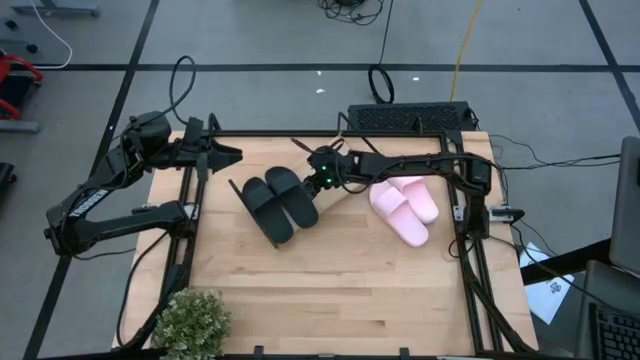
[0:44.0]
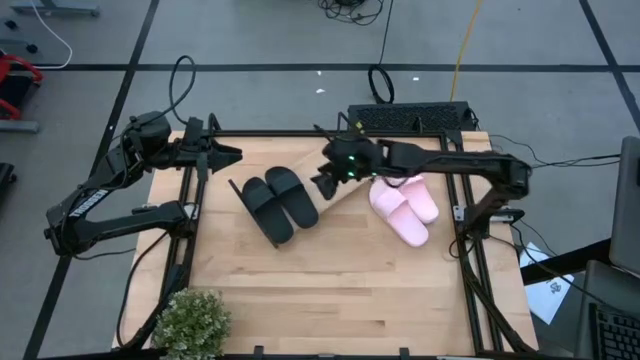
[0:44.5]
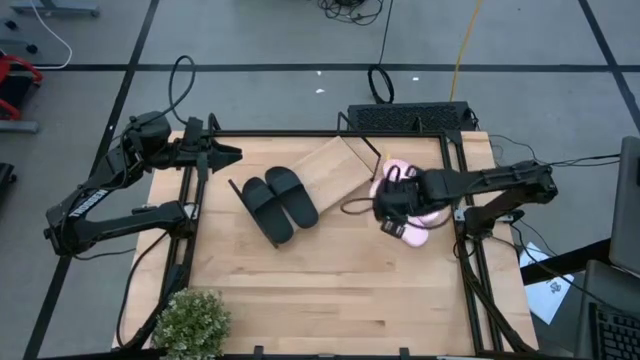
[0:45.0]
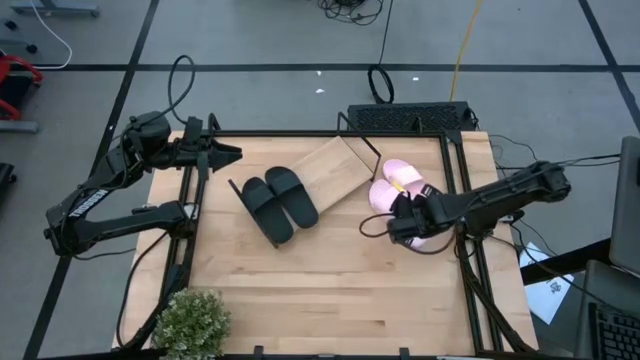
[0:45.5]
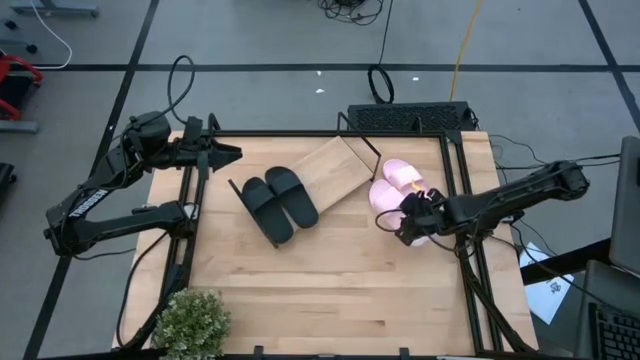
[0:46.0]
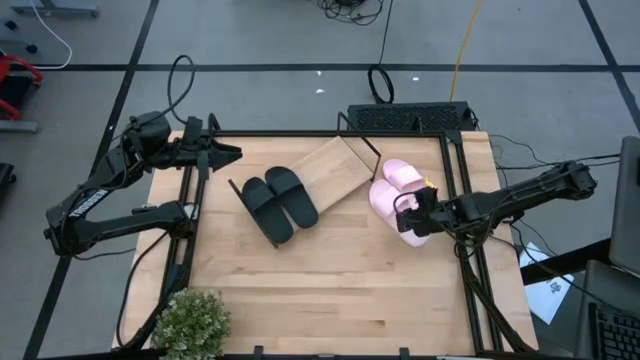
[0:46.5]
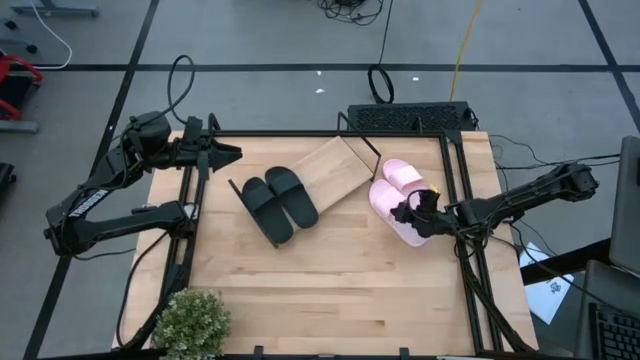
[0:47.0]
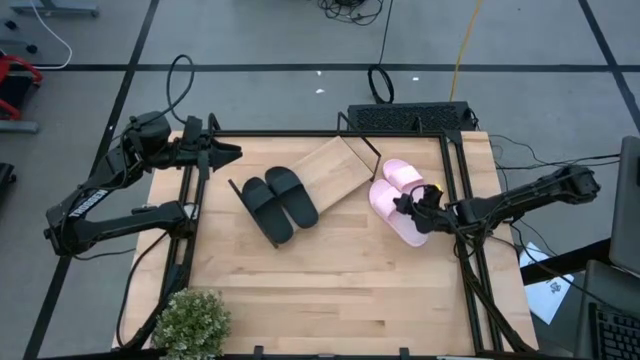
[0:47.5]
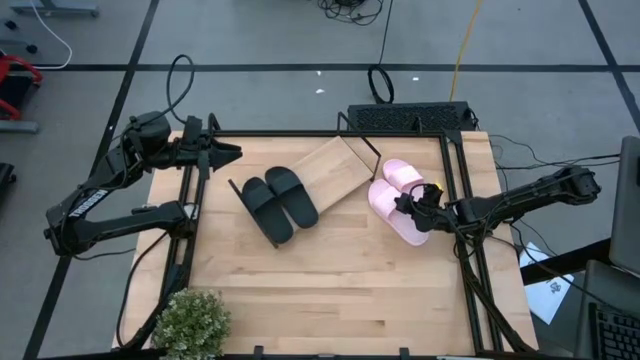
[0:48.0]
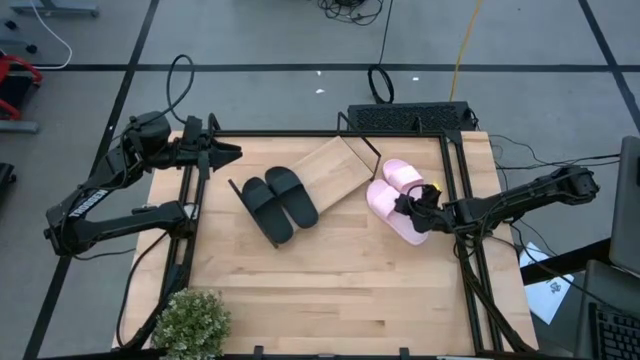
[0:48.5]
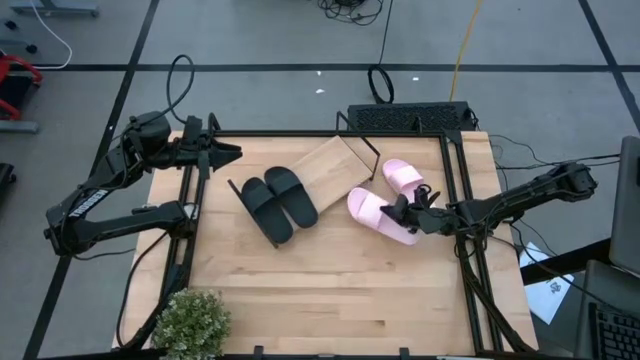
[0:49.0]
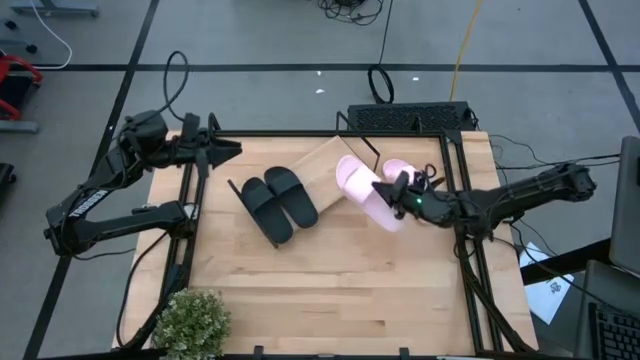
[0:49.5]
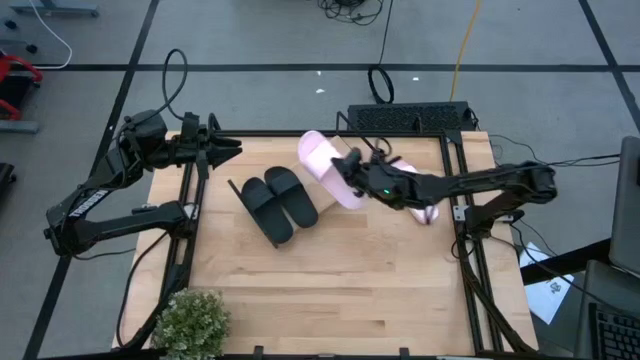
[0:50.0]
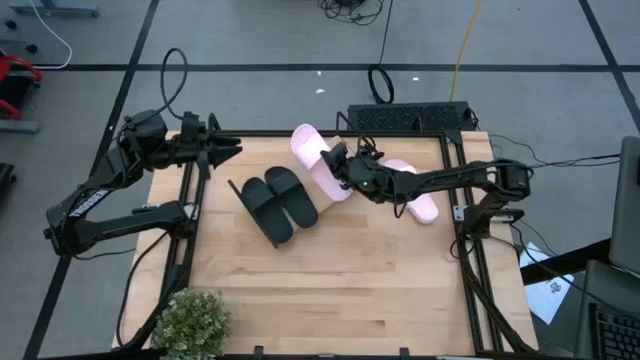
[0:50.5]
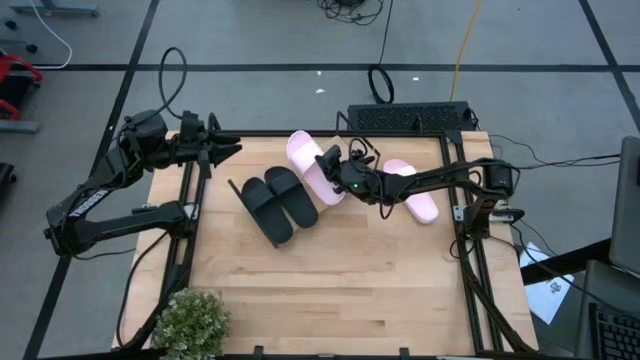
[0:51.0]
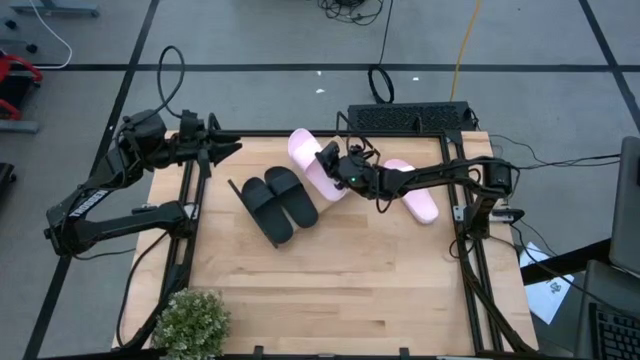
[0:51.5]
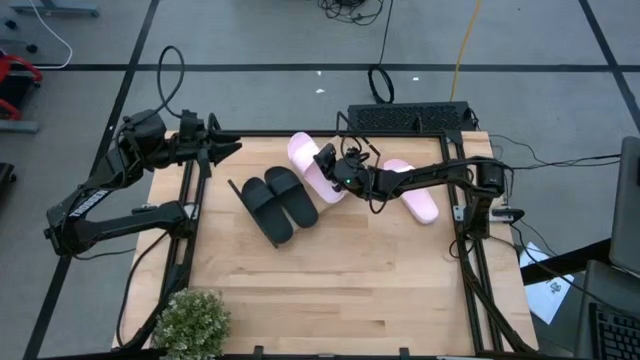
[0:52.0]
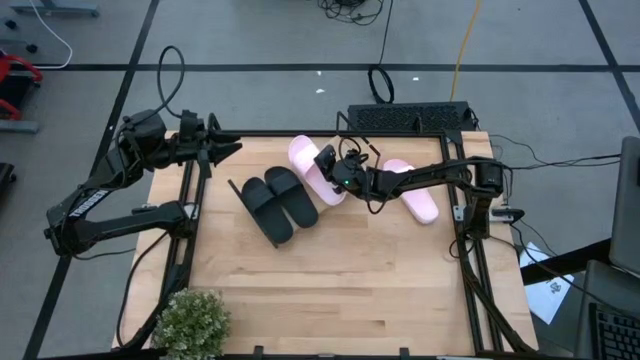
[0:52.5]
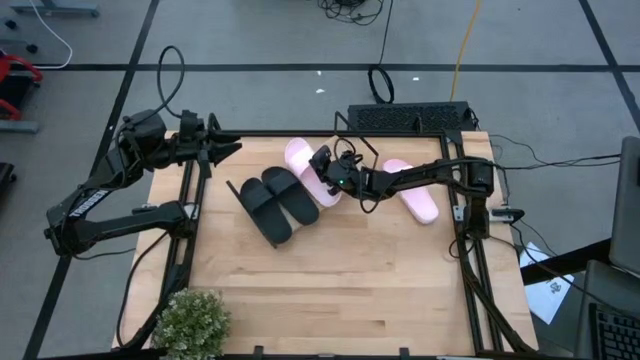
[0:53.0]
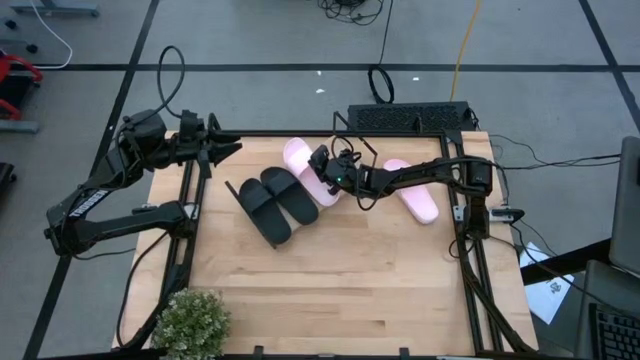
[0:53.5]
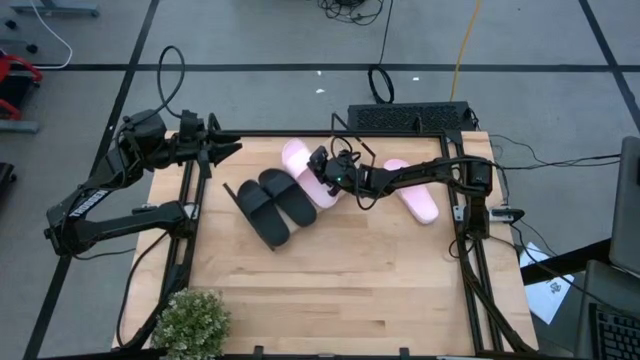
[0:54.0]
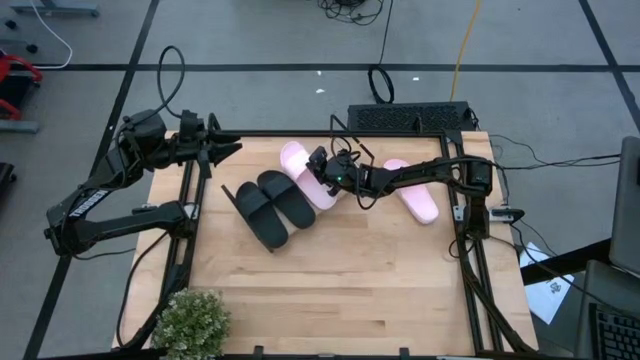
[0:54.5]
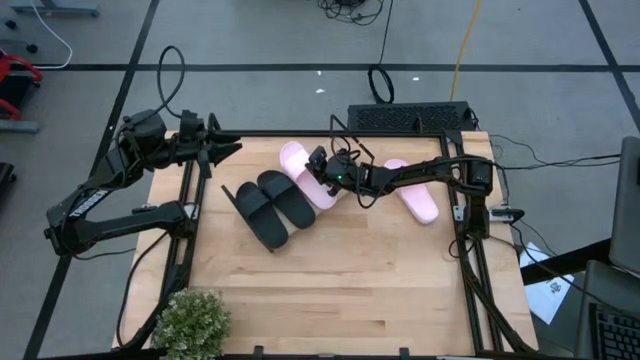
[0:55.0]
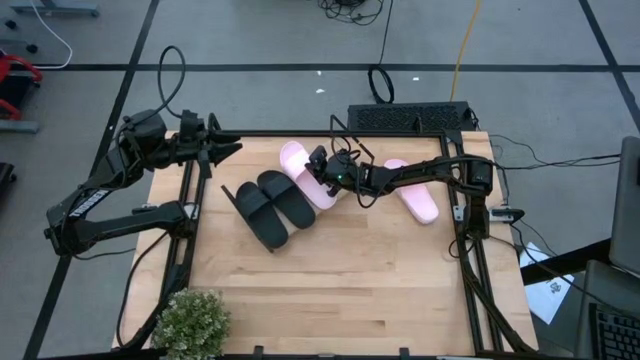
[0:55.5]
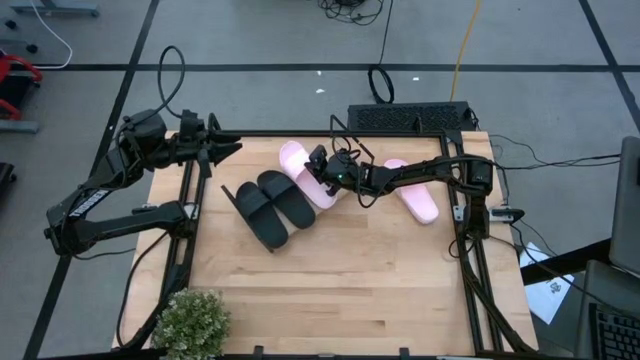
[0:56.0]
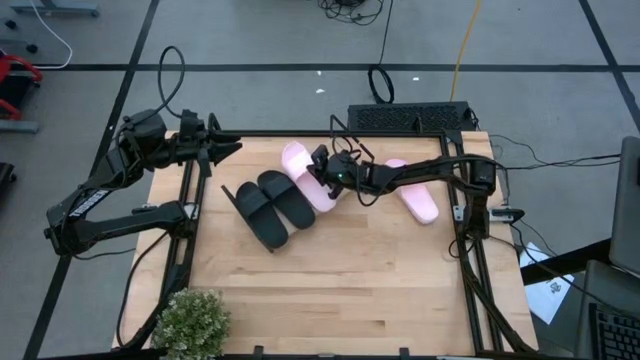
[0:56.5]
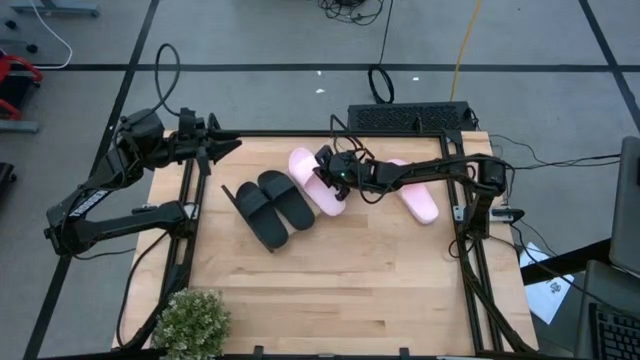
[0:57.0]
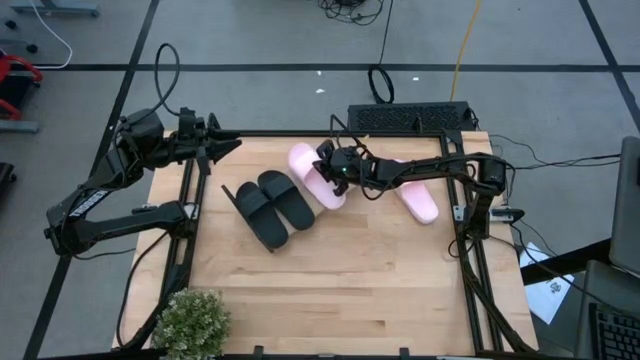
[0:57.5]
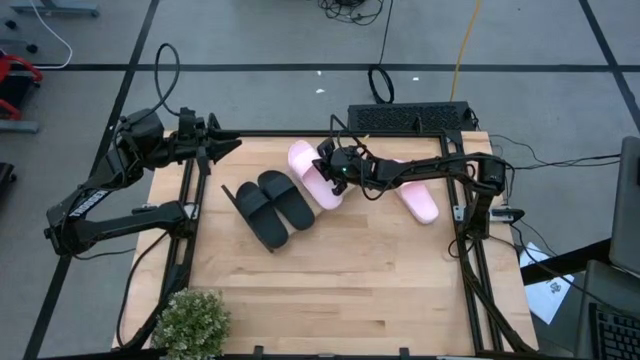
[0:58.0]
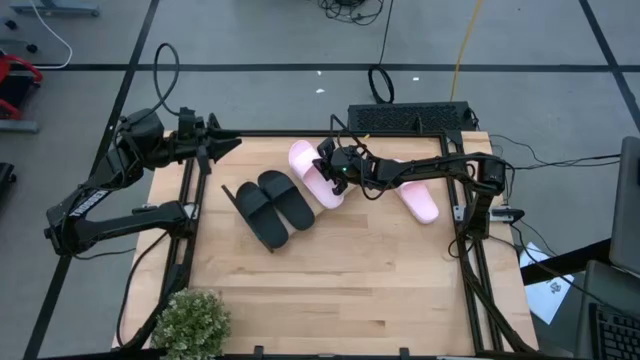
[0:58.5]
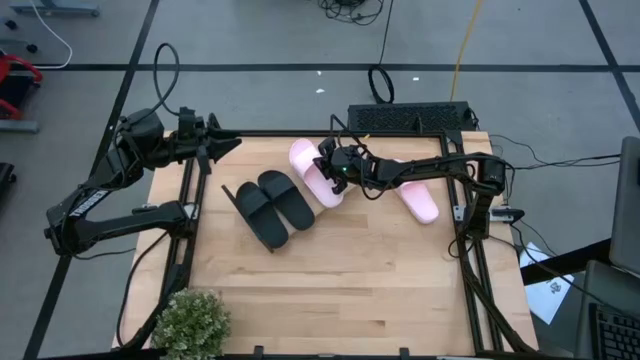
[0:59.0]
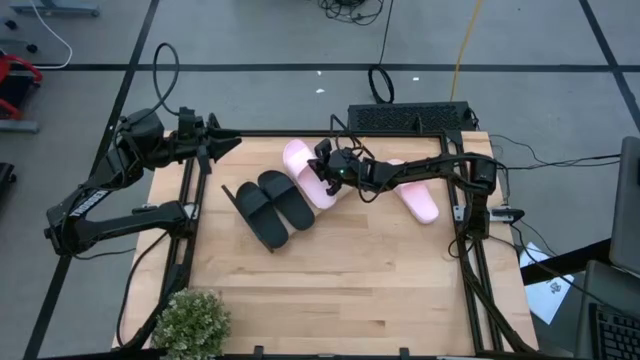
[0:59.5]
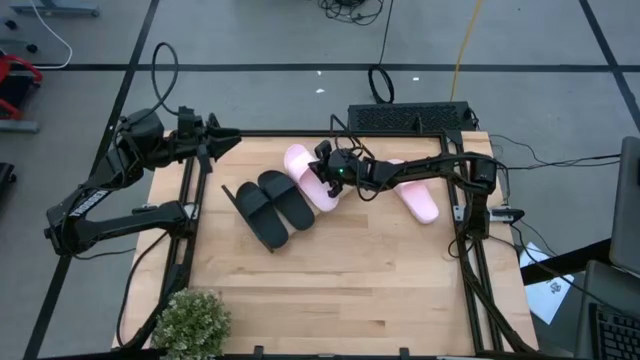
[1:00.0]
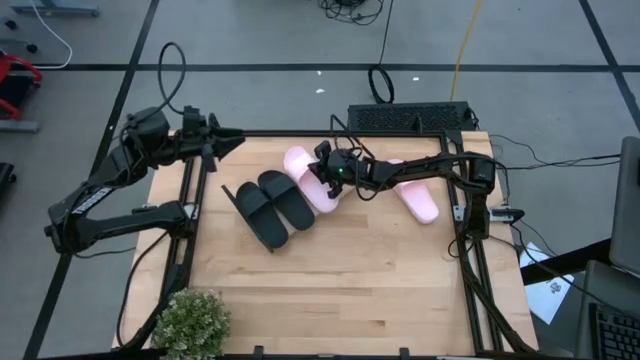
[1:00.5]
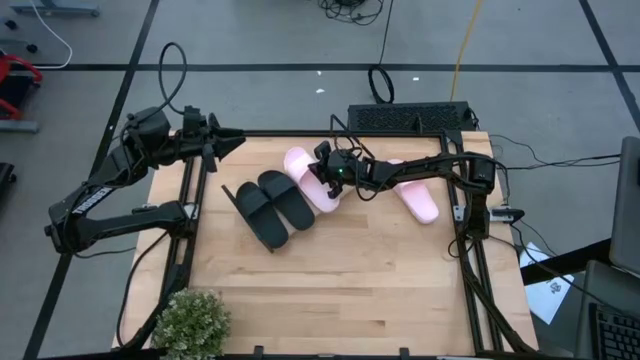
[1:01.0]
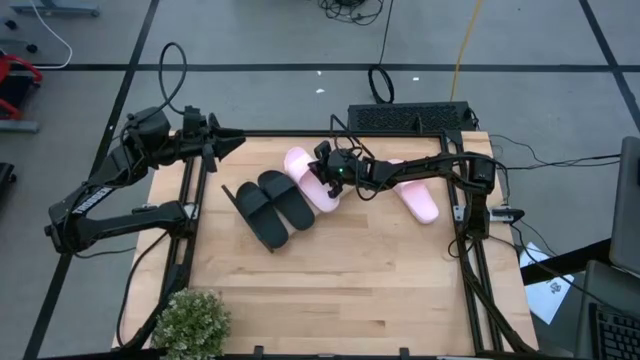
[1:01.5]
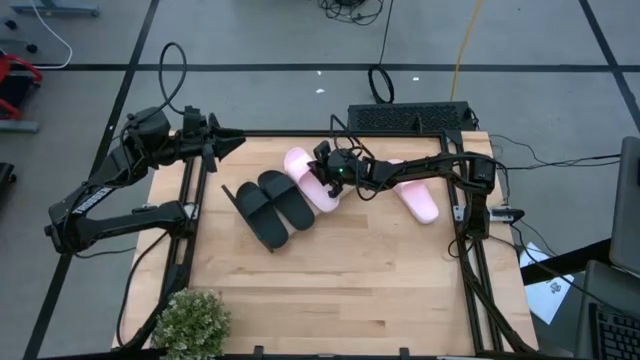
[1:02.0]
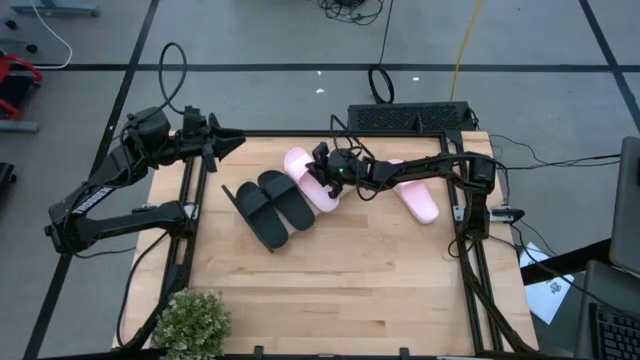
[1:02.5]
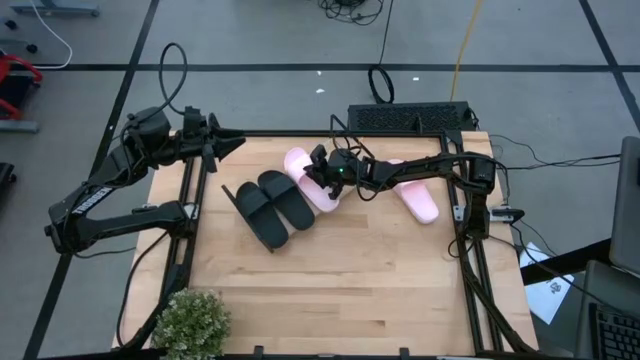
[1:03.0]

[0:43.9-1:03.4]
Task: Pick and place slides into the shelf
Put the left pink slide on the shelf
